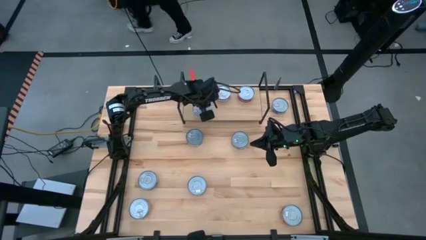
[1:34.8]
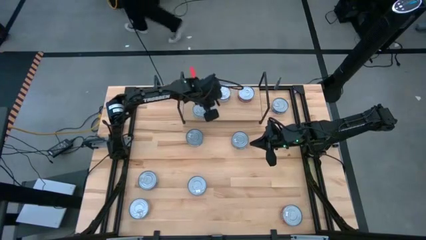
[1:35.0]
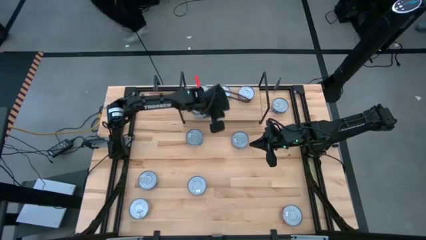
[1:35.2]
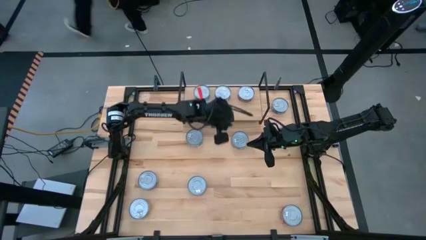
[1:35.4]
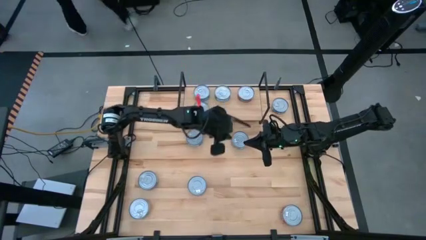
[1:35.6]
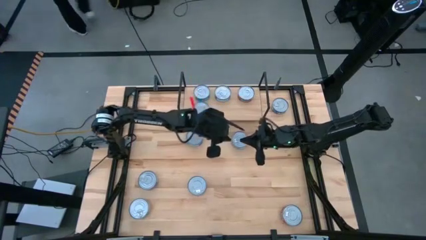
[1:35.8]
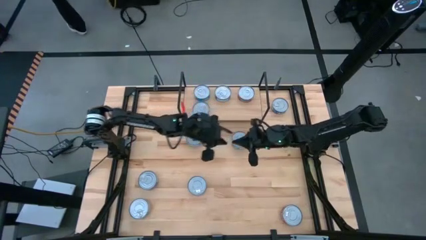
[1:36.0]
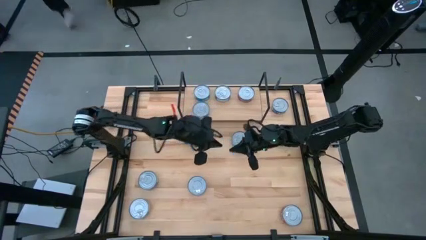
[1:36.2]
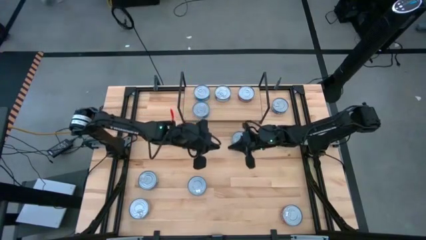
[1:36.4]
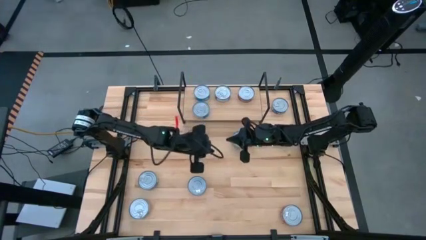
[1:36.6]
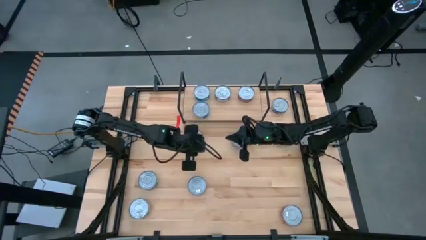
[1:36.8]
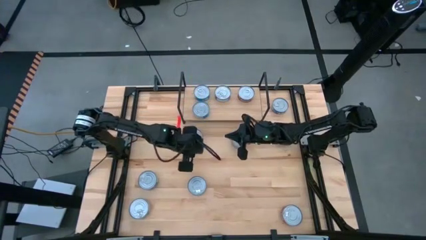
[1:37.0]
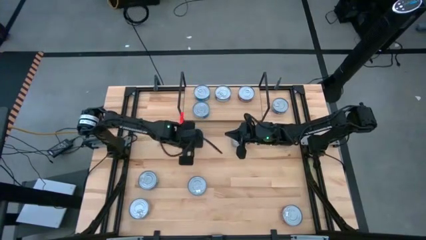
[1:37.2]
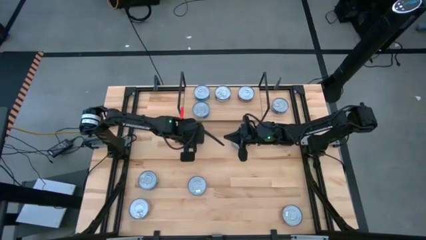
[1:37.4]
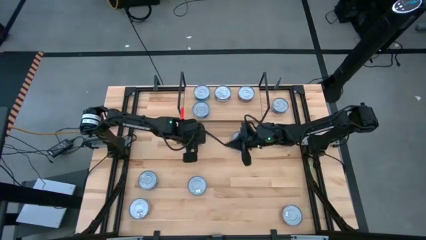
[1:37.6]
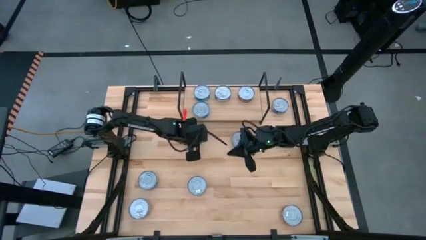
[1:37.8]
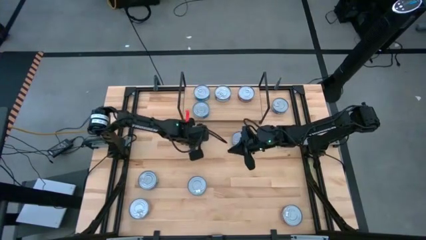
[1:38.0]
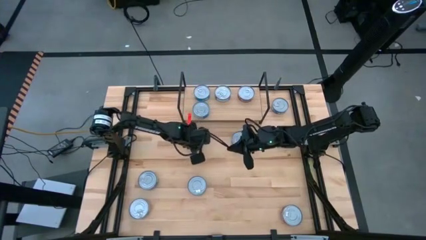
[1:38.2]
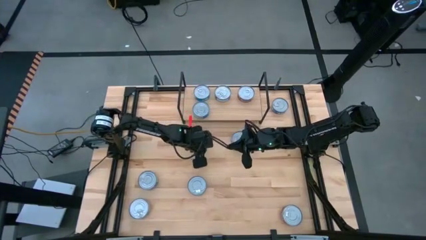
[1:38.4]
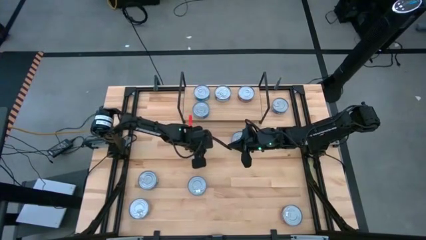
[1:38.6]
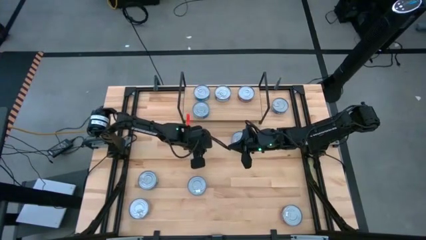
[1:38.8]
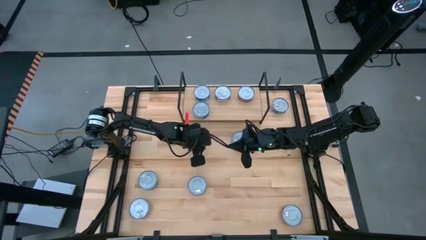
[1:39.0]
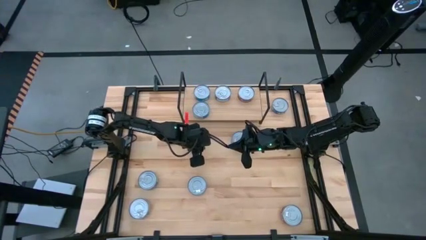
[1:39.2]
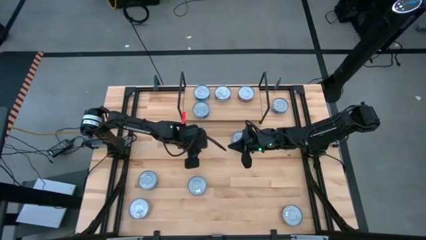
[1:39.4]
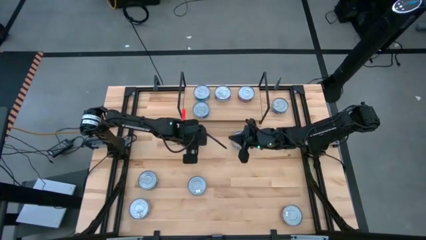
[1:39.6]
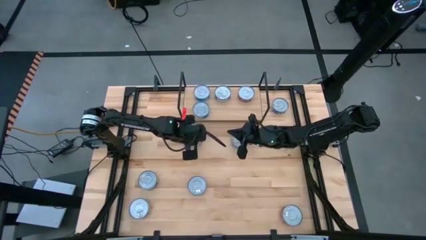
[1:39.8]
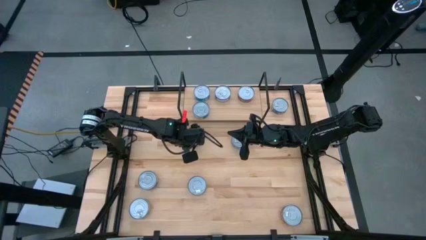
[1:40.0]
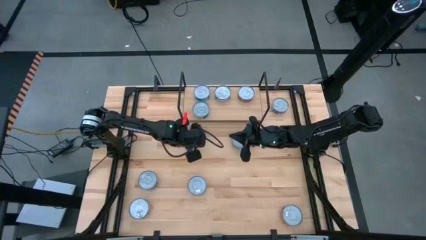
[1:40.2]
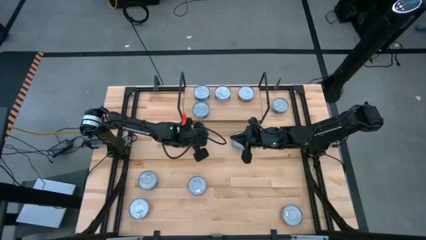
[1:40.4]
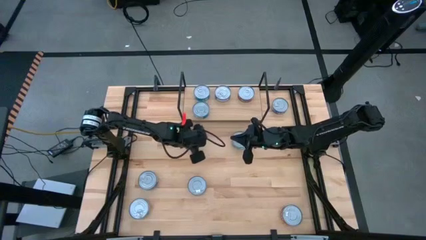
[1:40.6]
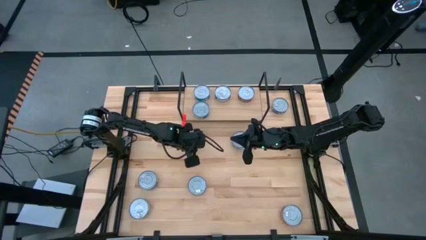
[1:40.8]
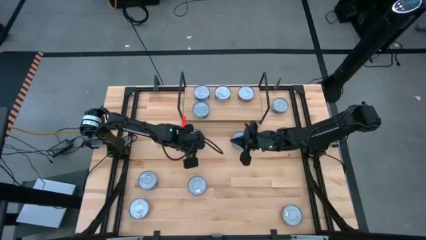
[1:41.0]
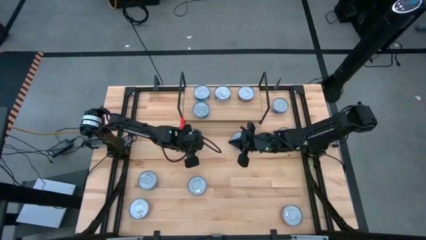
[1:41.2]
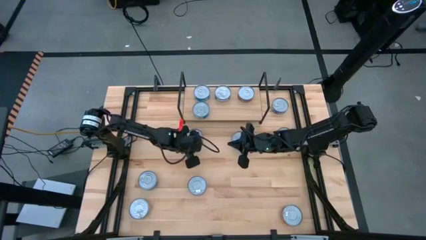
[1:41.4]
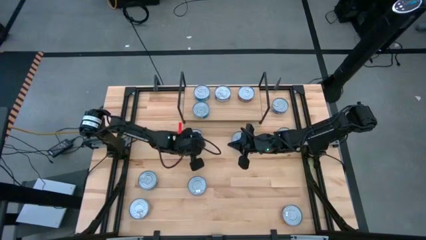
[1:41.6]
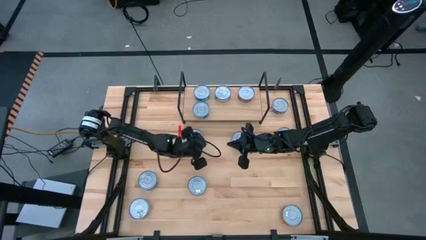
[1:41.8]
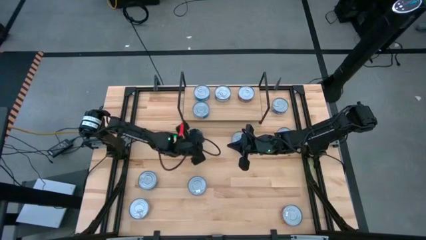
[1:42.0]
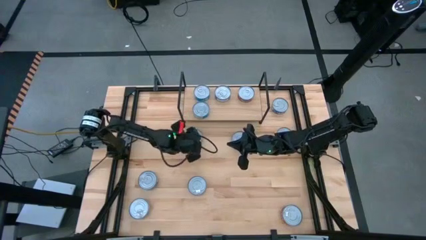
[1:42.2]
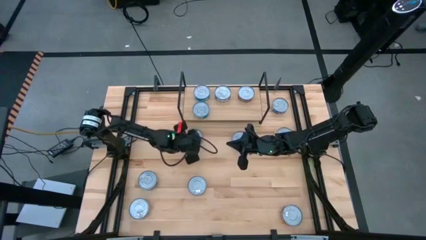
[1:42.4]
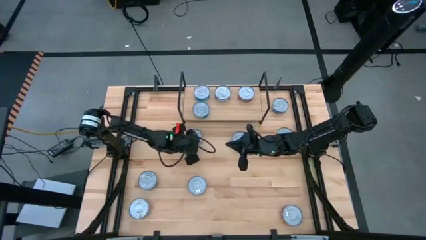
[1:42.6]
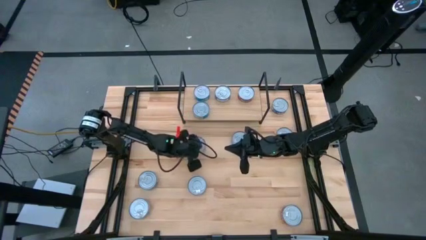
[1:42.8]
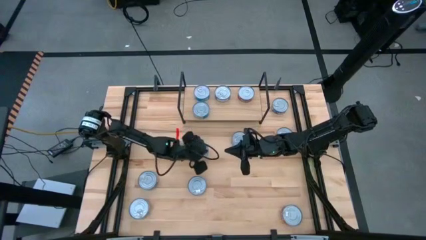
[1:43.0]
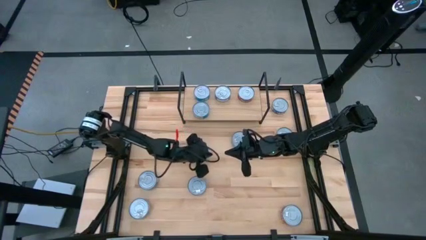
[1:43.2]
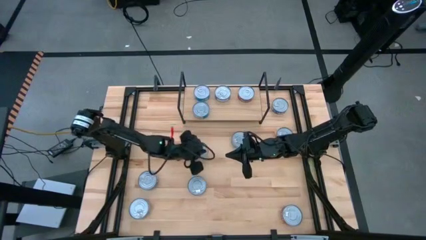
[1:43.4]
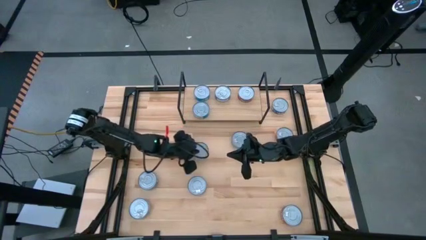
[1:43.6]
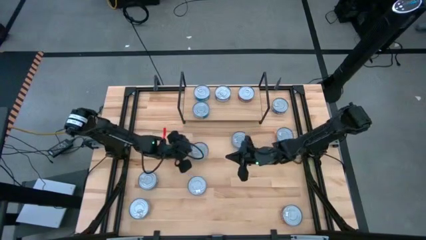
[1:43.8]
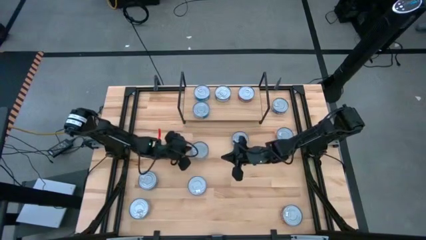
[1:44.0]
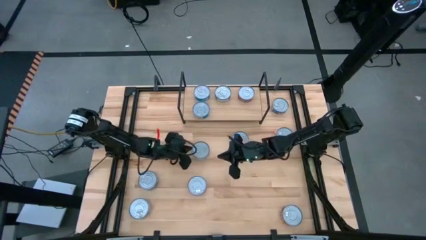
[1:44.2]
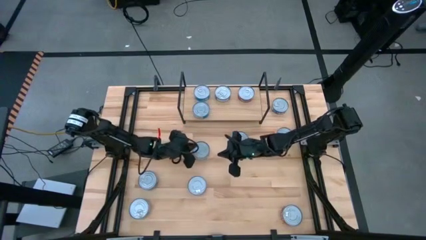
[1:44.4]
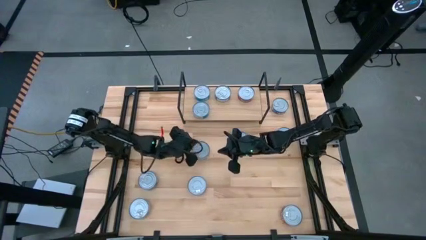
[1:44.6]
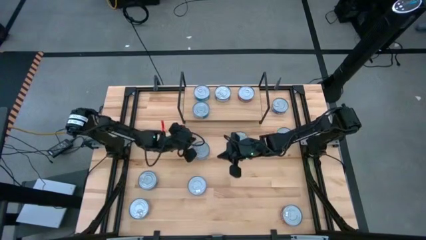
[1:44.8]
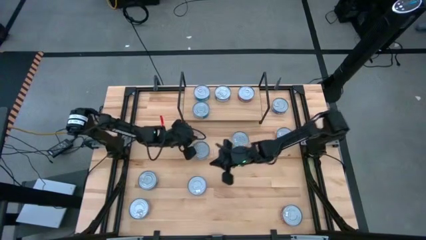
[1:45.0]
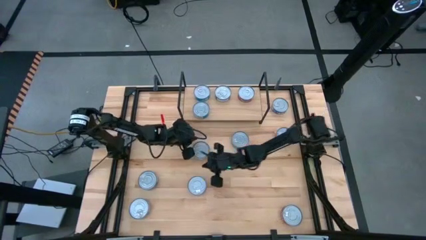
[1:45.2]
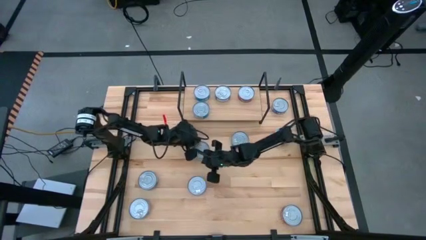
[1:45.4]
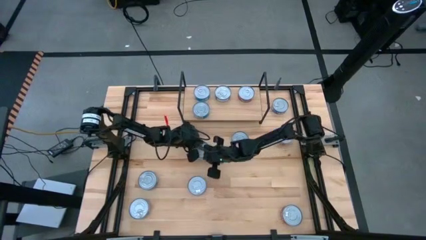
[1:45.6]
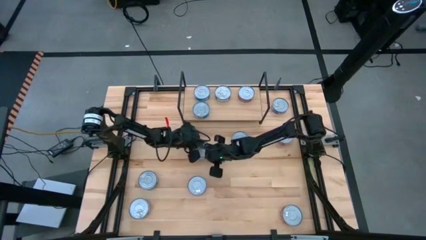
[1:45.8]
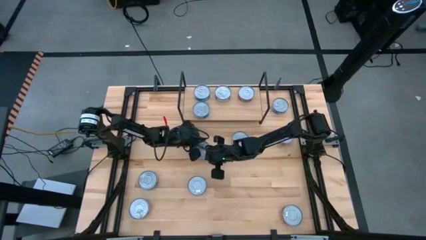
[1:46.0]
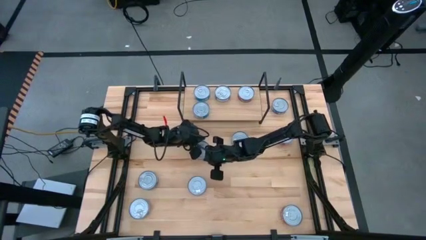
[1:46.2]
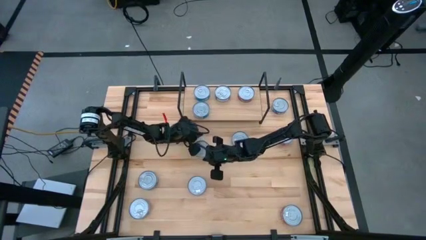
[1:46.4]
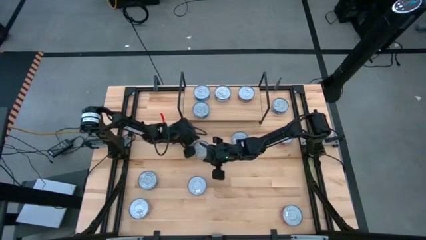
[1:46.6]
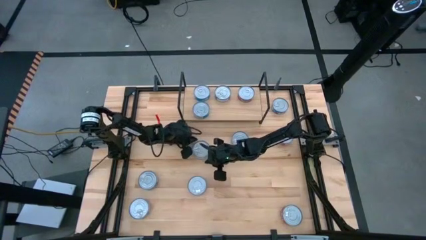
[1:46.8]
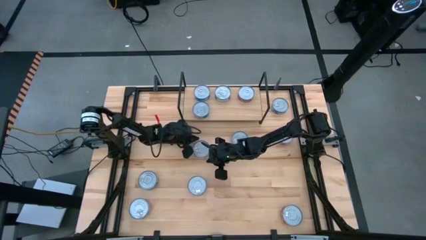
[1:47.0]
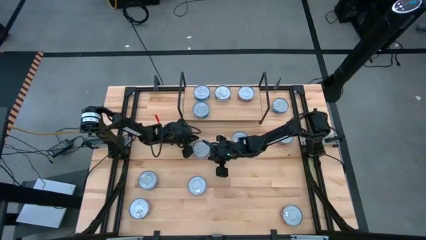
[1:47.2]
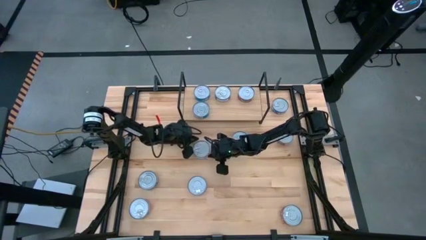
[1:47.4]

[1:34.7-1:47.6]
Task: Stack canned seafood by type on shelf
Put the blue tuna can on the shelf

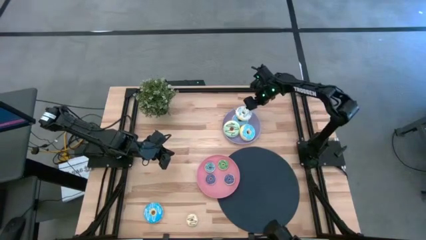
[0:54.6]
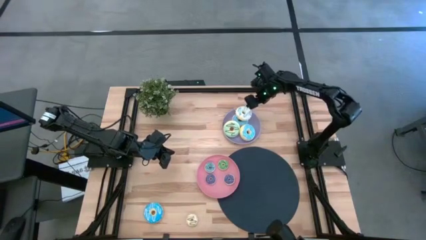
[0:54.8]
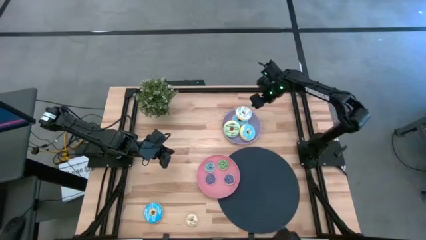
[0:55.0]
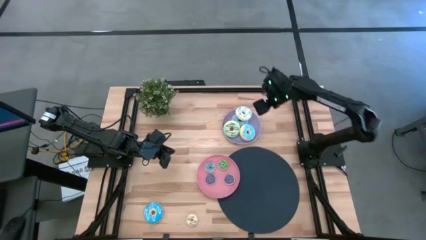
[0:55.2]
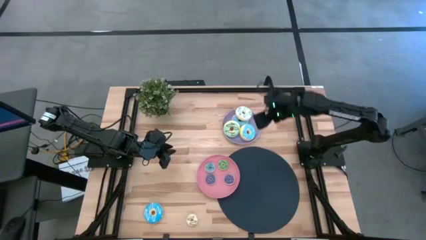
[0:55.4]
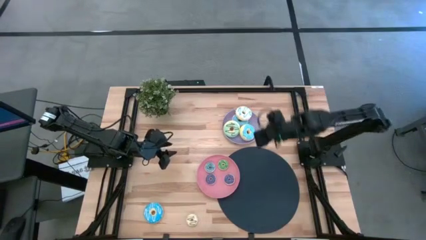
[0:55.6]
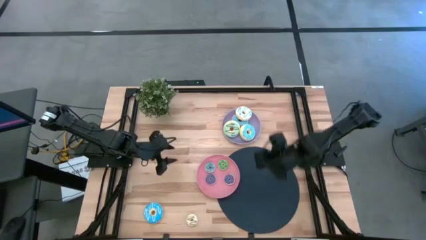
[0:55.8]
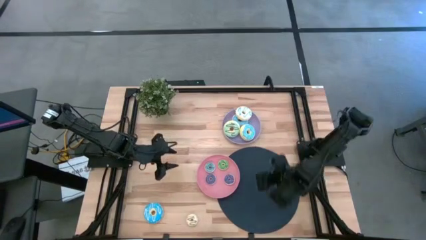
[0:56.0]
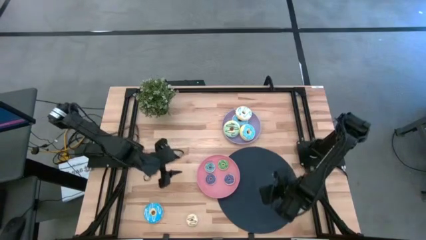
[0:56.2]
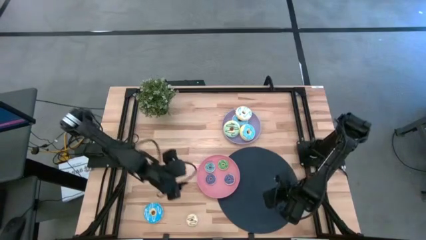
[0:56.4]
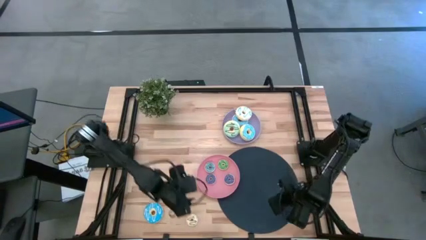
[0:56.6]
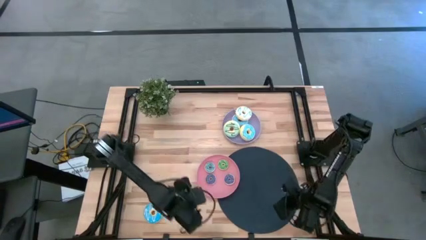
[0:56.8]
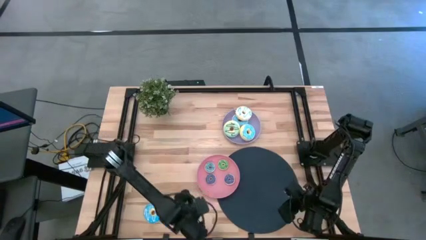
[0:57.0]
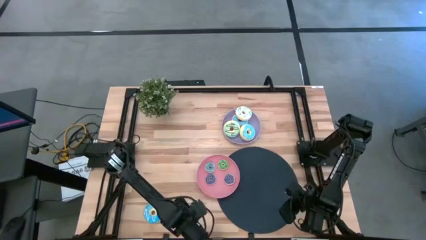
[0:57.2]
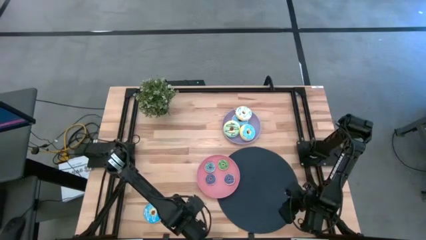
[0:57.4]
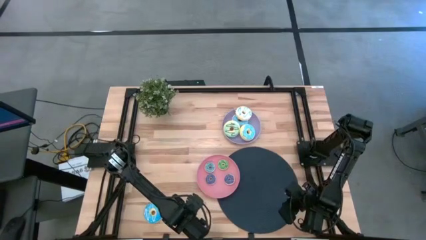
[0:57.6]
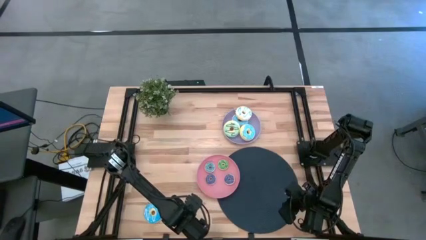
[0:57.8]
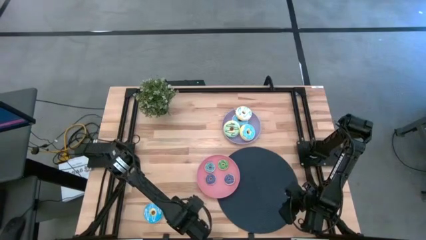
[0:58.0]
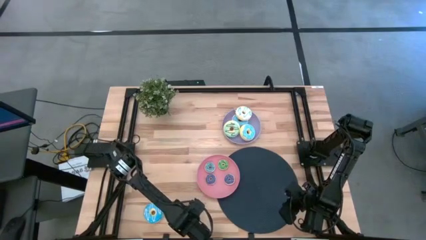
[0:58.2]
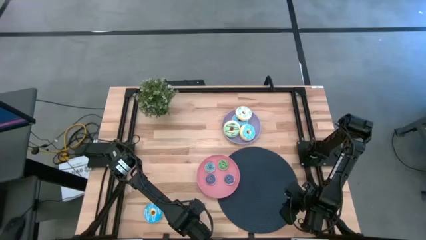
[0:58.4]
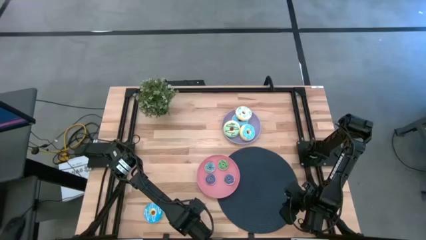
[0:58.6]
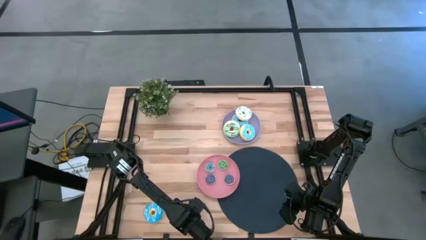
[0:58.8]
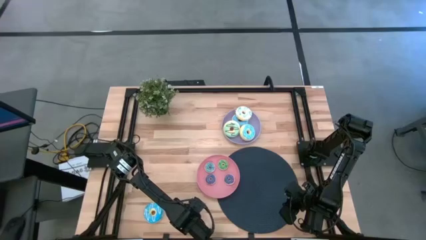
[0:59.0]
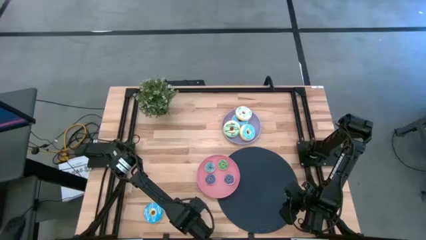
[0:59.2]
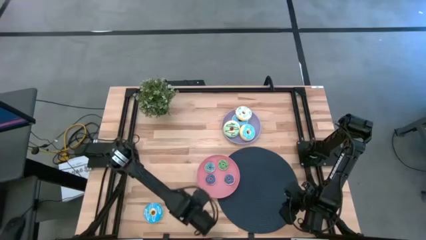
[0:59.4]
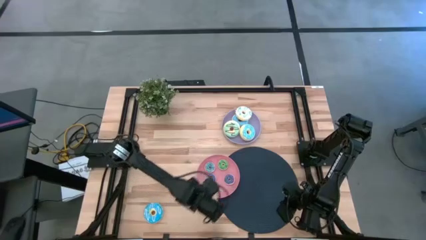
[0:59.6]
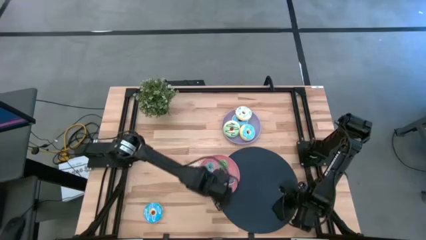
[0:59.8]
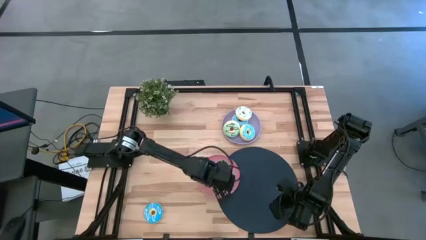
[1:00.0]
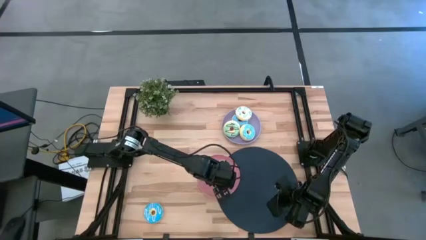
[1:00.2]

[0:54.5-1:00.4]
Task: Pick & Place donuts
Put the small white donut on the pink plate
